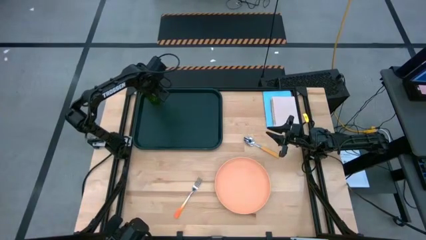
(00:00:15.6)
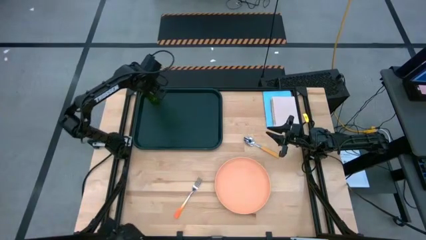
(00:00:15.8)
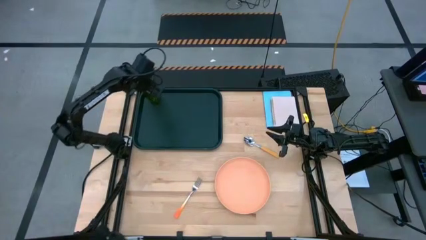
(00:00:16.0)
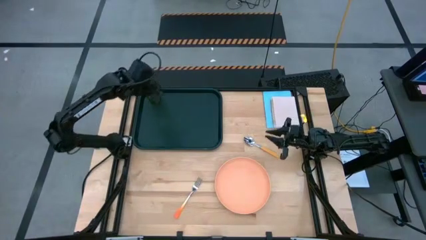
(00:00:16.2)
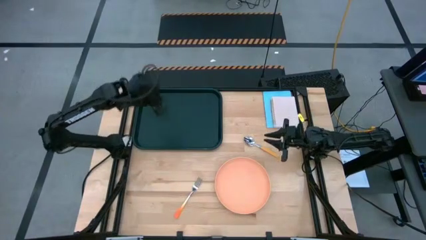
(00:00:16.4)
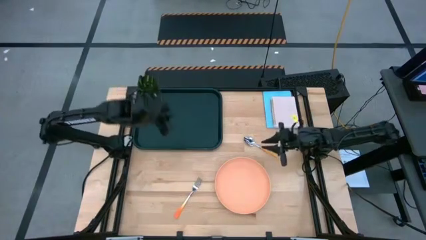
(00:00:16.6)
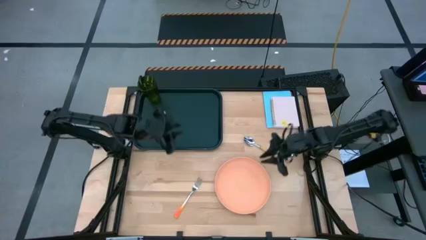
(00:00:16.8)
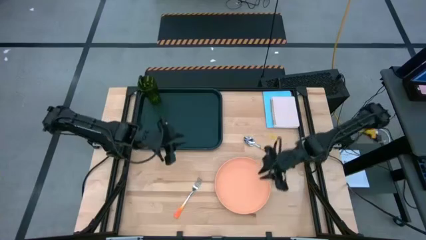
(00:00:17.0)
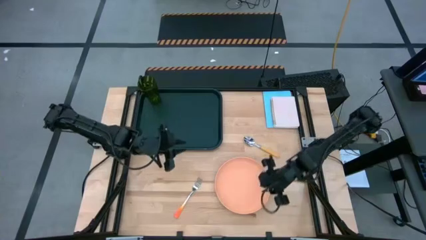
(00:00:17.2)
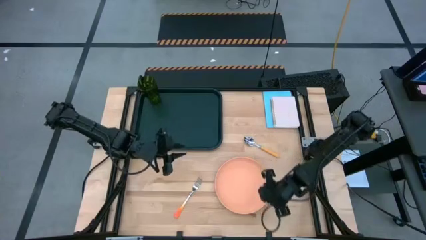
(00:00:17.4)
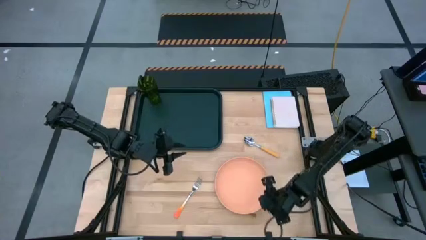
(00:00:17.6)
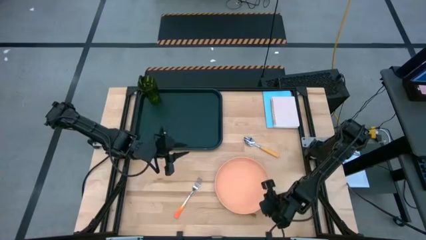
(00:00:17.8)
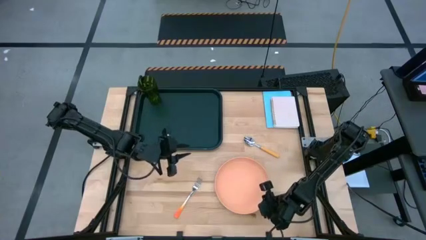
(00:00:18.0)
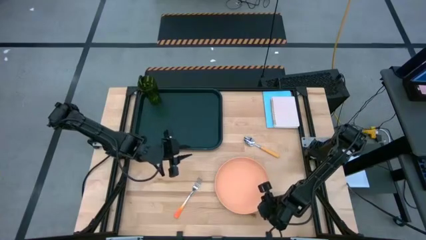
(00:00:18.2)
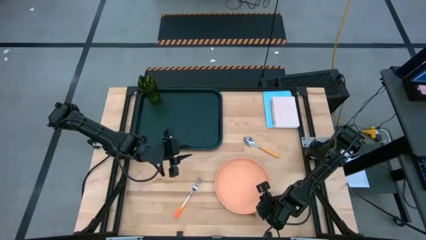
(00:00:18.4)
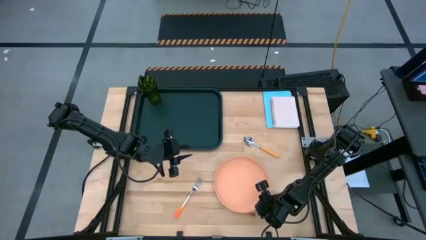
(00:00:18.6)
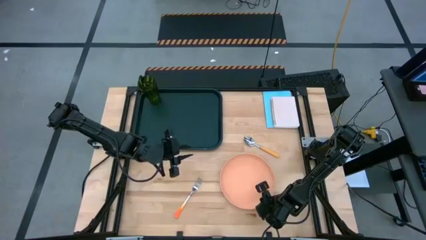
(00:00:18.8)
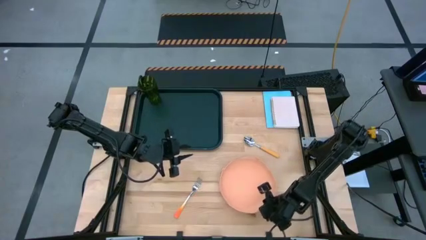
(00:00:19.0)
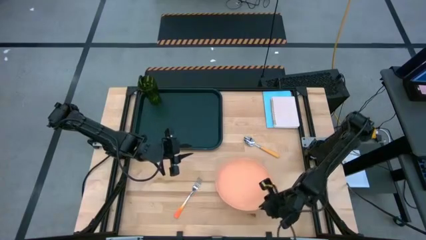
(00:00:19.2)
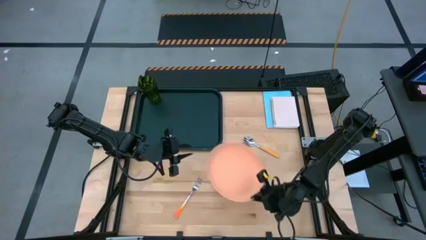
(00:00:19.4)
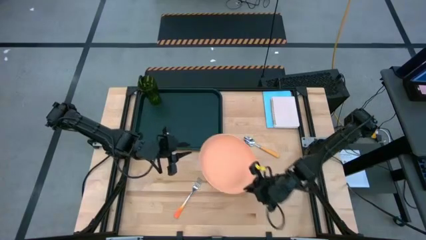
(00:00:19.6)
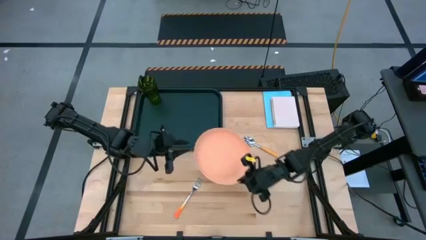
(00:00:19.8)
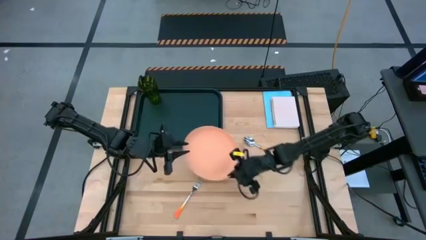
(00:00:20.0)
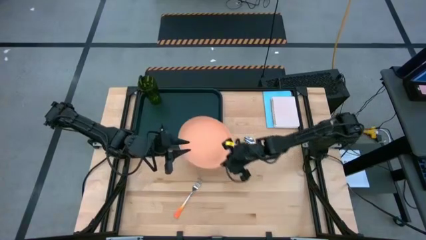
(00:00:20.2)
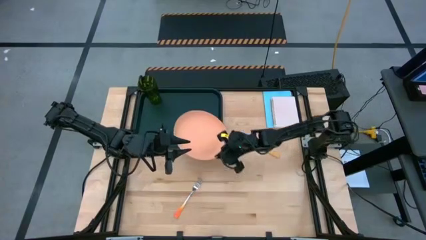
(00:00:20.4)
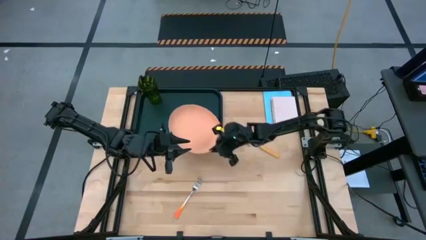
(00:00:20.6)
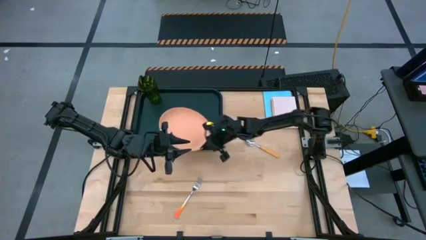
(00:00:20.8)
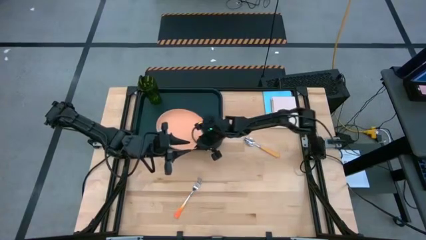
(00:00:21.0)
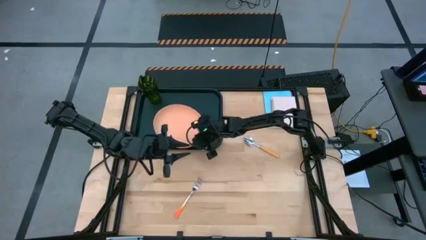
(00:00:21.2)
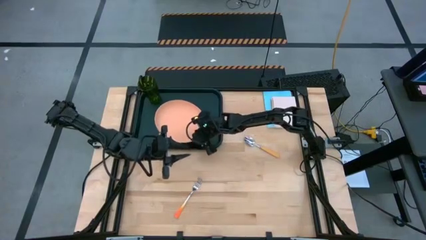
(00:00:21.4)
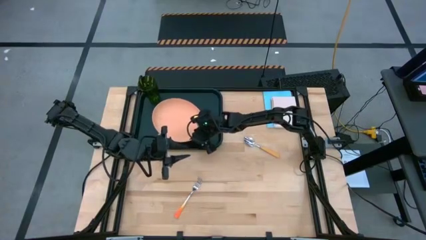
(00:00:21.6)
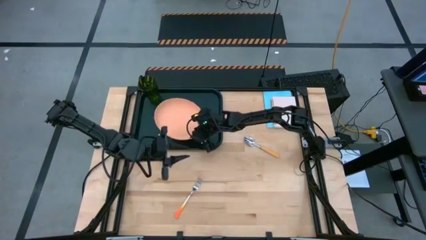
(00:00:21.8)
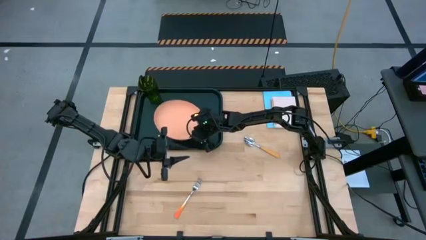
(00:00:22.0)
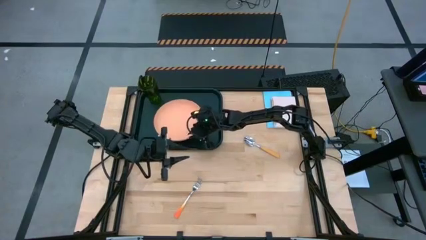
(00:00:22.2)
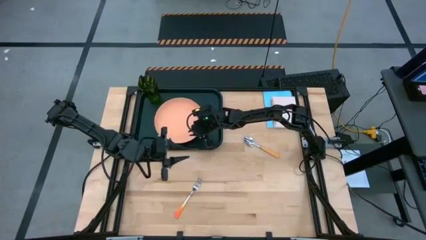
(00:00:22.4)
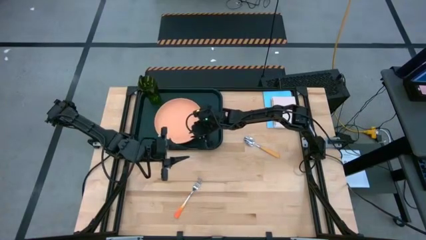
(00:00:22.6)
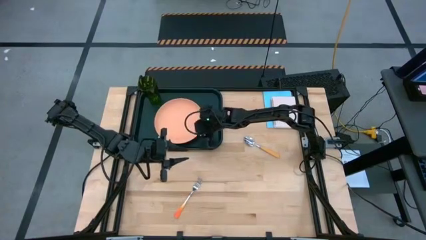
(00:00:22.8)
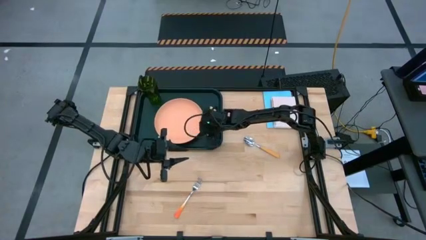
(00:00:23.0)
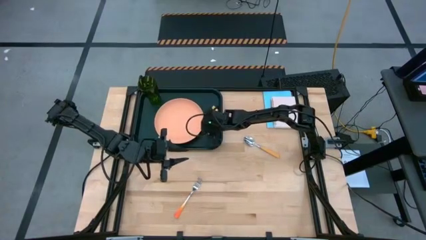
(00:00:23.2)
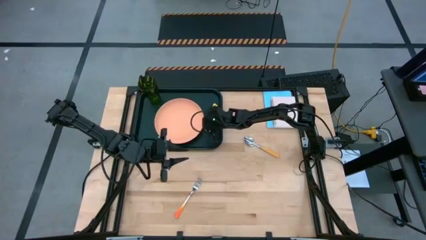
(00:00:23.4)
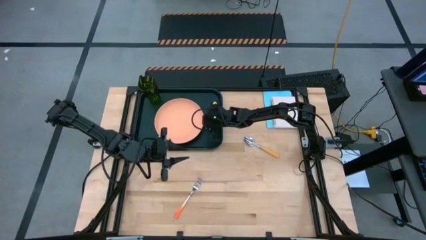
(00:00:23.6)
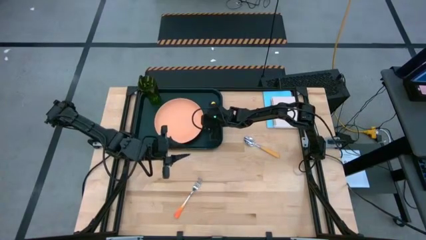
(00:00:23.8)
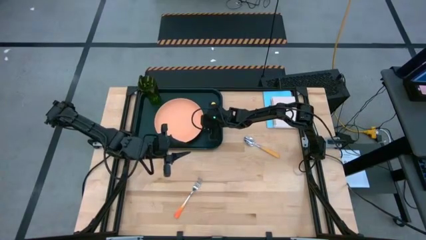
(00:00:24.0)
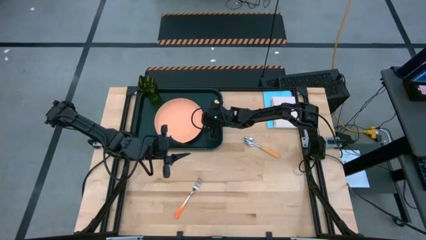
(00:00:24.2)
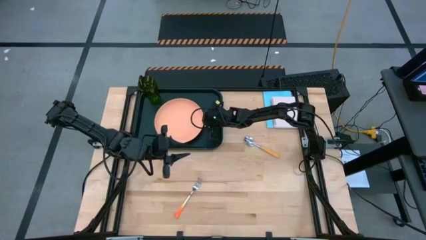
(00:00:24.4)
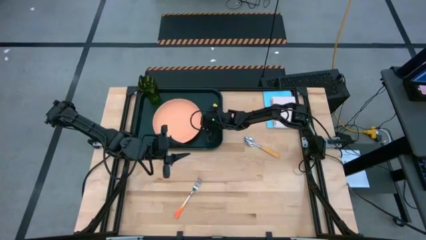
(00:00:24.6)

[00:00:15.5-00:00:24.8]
Task: Pick and place plate/cup/fork/spoon on tray
Put the orange plate on the black table tray to the bottom right of the green cup

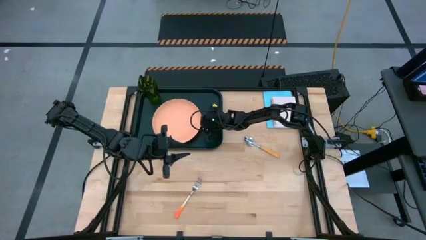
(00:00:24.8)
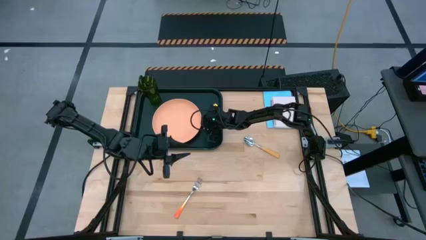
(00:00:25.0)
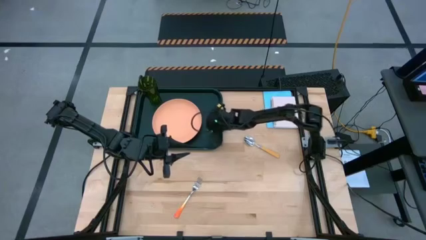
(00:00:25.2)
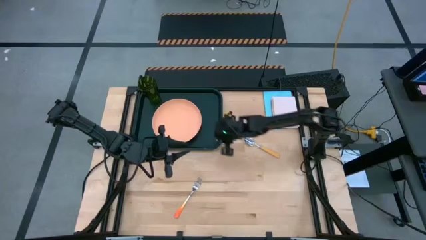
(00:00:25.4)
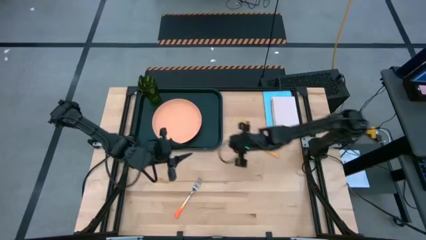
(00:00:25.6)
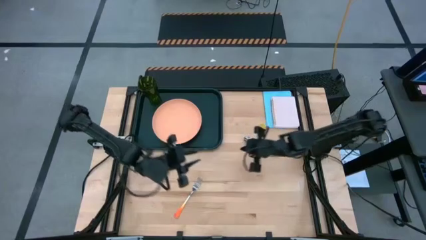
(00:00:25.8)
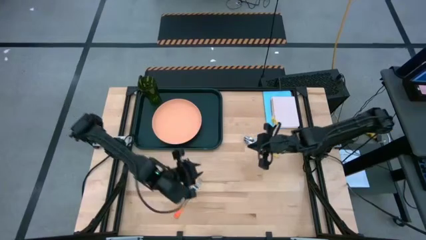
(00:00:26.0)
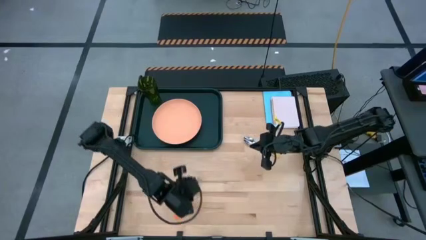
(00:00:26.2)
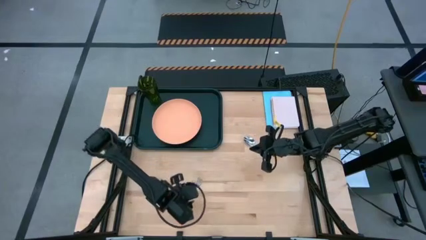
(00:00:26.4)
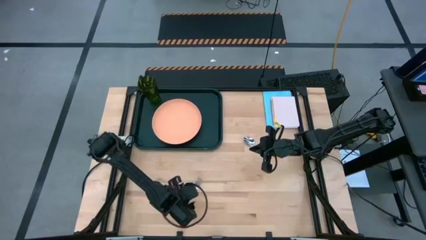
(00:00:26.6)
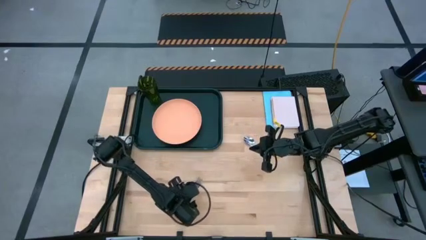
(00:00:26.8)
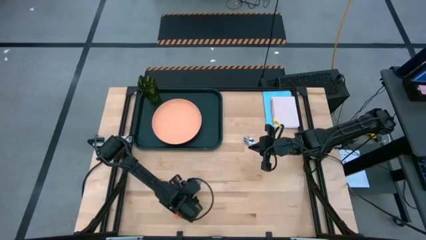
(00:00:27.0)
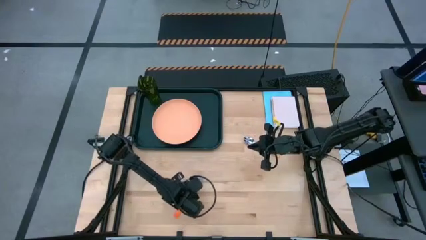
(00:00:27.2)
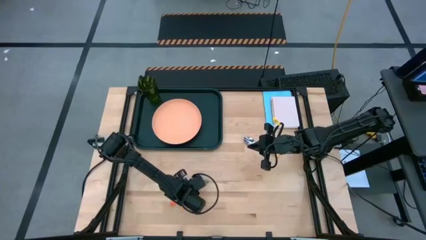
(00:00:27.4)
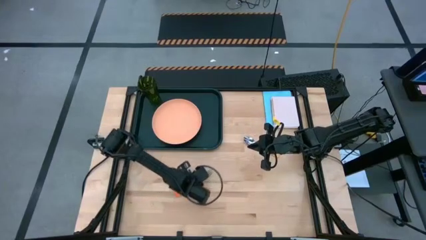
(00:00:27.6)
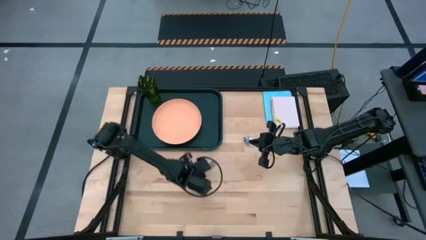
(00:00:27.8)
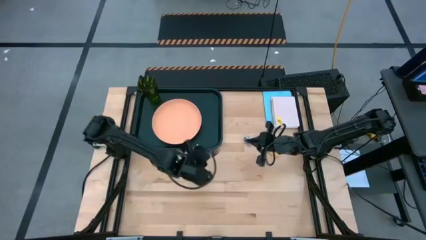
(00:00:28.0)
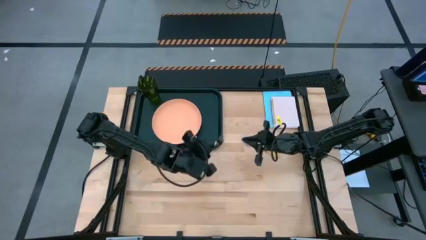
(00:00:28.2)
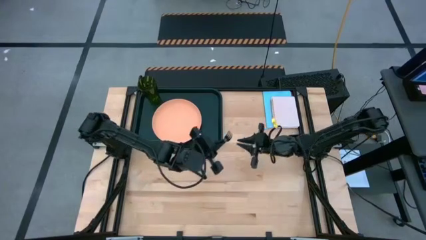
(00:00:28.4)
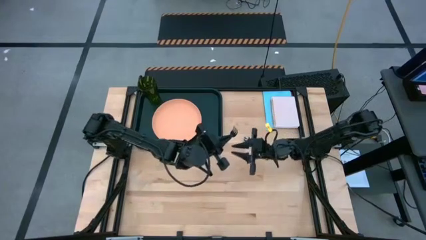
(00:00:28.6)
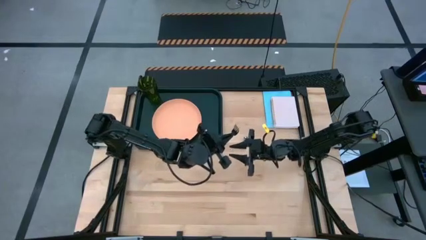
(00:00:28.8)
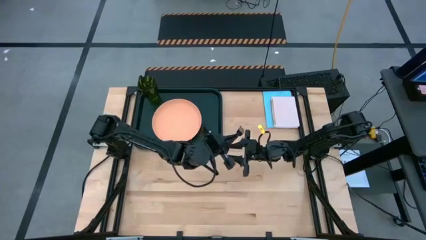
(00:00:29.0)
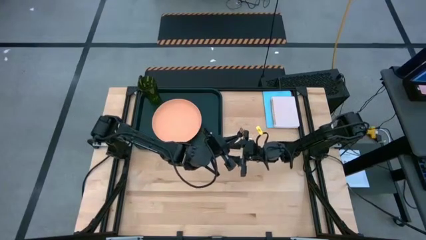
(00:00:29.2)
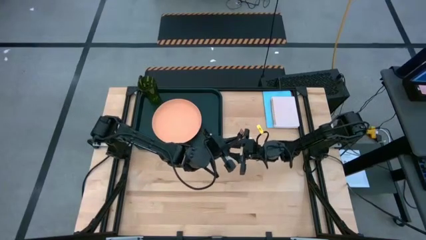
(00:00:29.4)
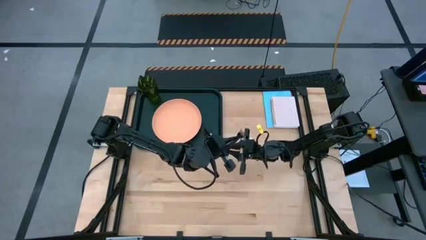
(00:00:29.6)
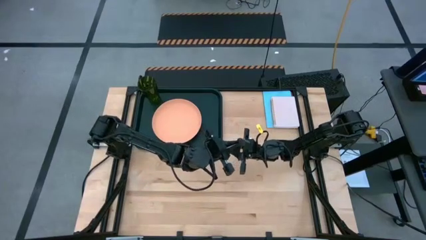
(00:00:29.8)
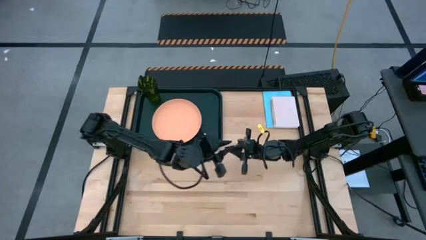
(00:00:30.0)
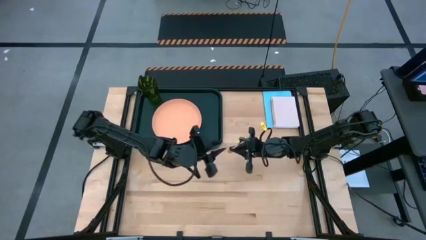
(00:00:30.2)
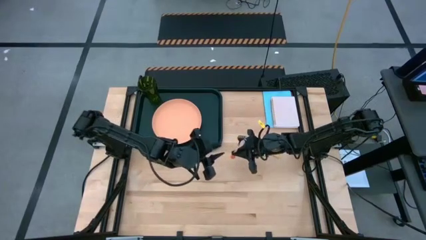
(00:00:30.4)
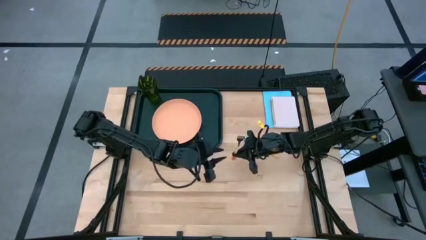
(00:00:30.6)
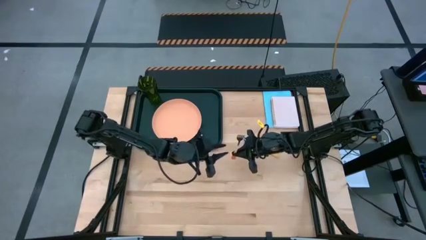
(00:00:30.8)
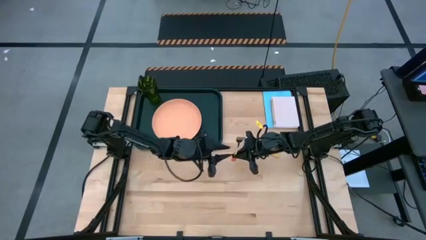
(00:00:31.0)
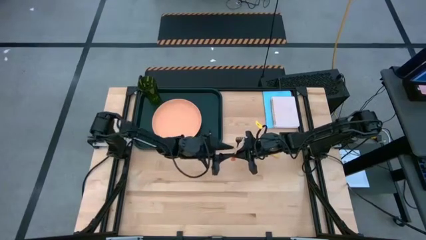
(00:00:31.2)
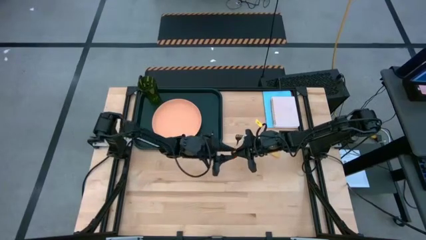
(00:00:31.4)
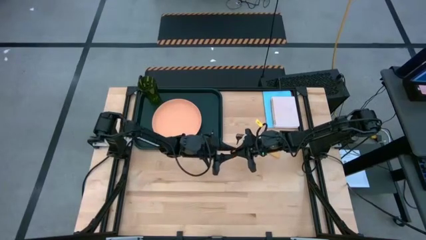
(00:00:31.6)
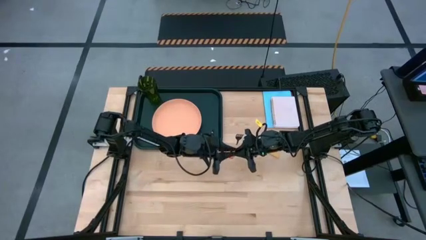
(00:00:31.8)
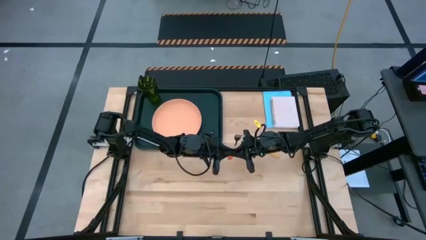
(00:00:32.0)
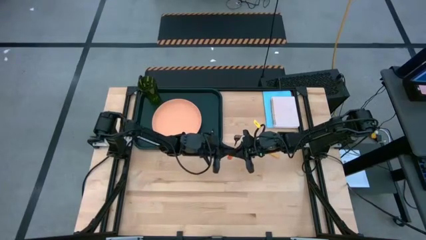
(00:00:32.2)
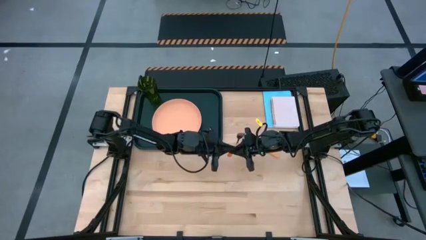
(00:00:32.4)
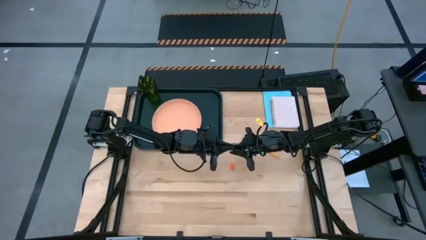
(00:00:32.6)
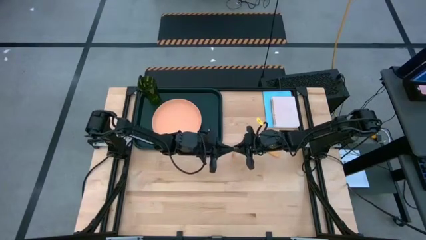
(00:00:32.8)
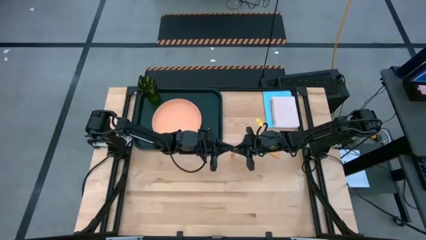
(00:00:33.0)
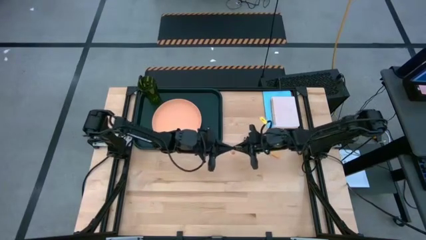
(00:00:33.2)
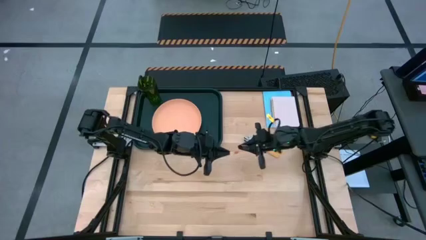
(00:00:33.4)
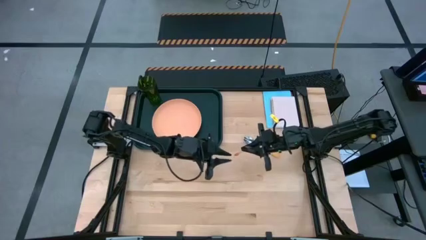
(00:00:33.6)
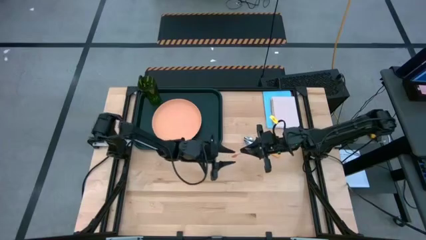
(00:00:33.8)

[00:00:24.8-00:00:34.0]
Put the orange fork on the black table tray to the right of the orange plate
